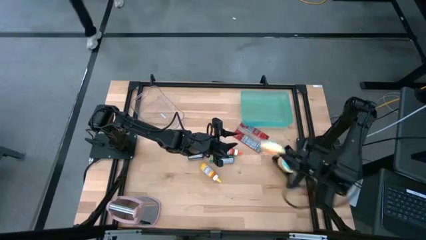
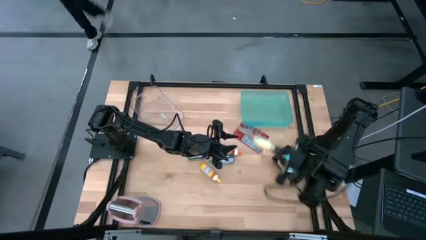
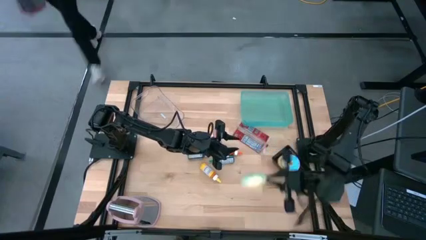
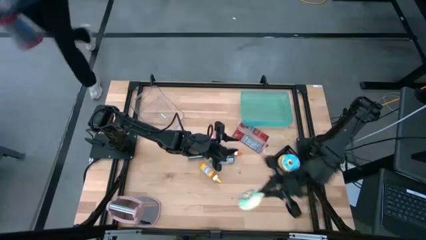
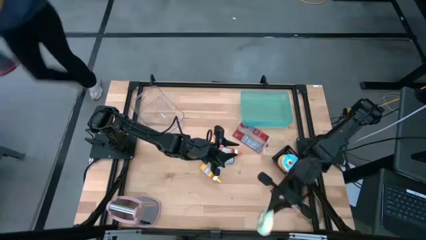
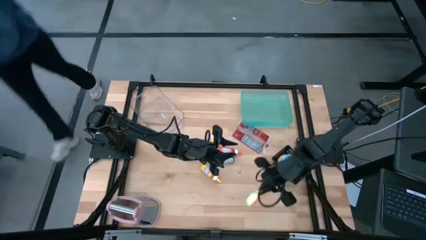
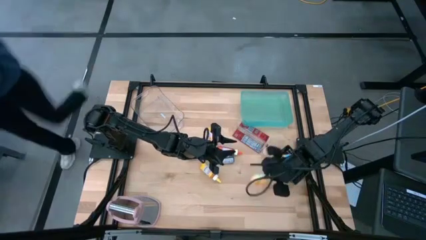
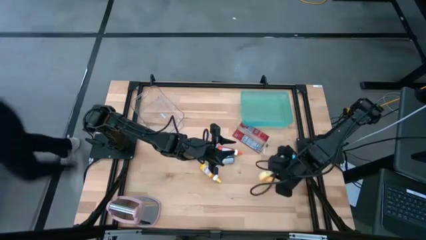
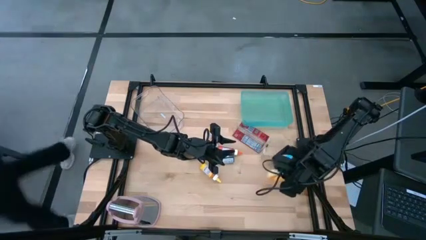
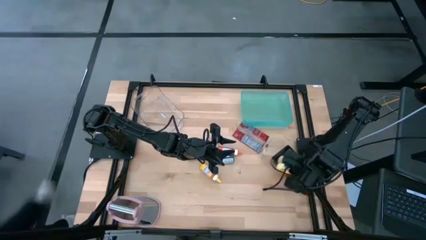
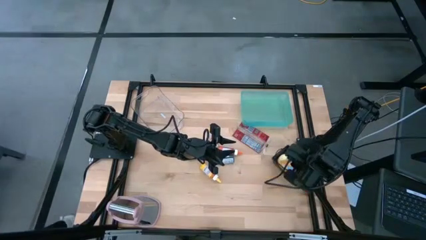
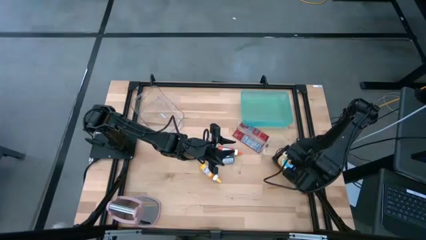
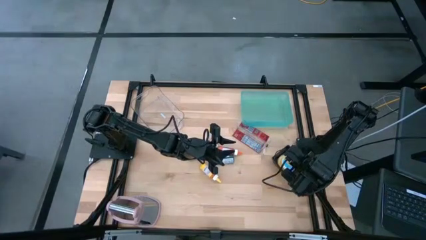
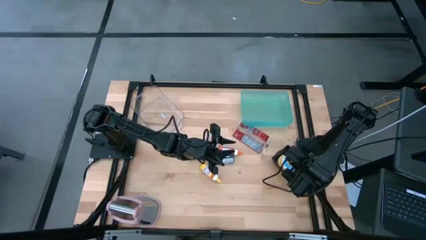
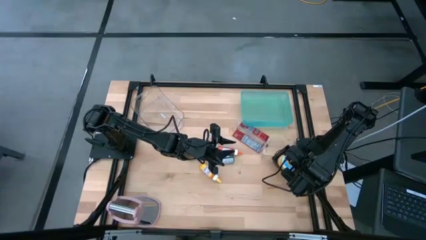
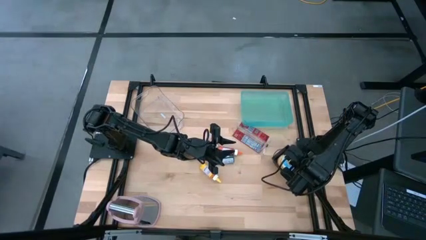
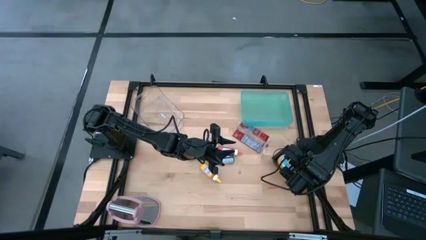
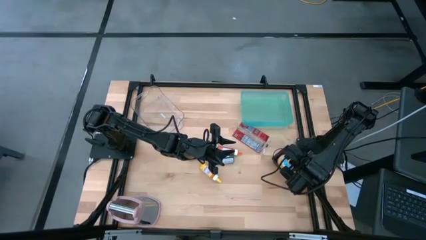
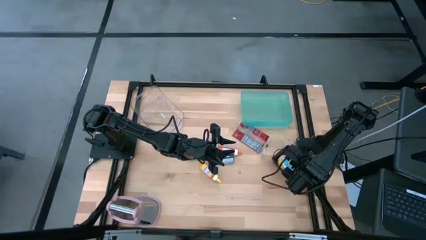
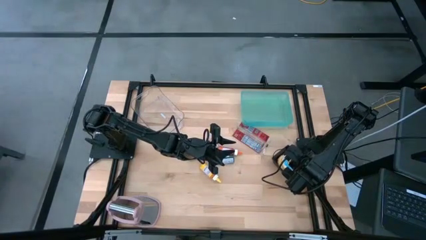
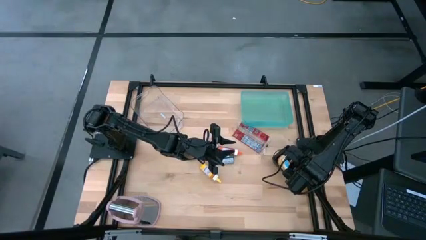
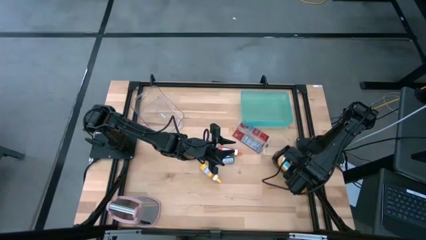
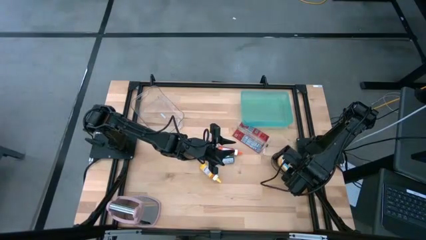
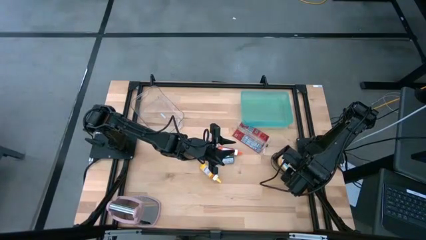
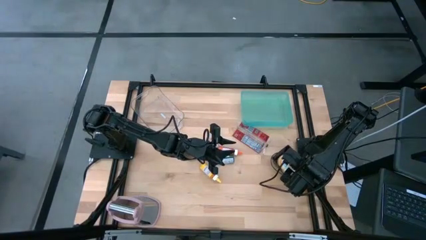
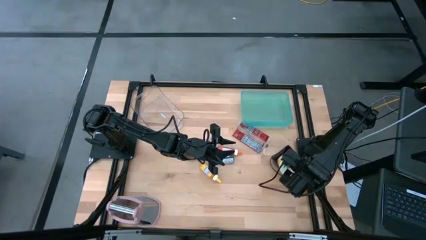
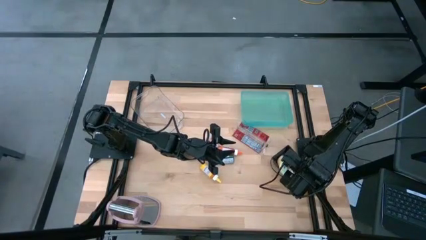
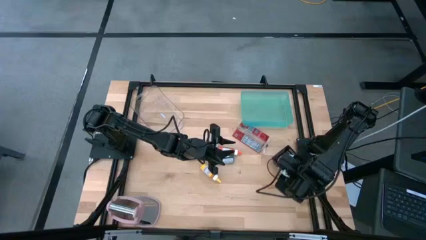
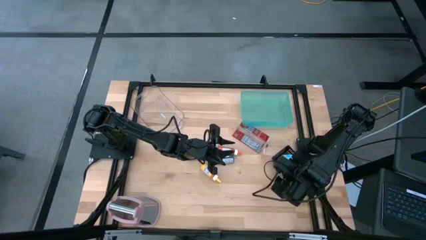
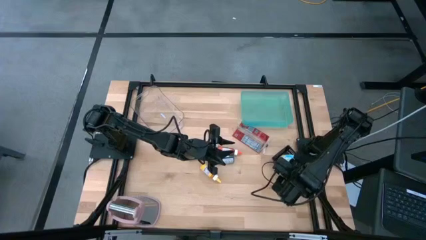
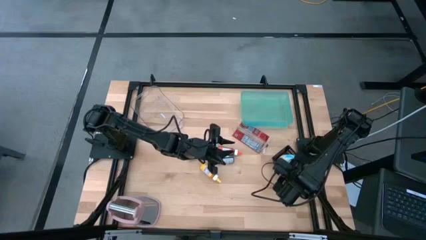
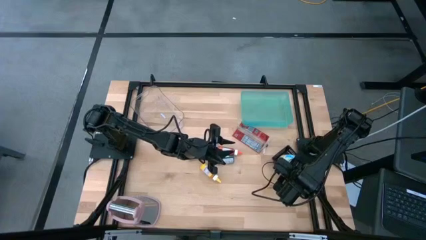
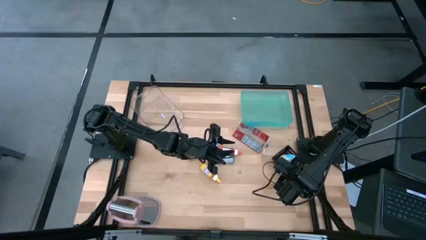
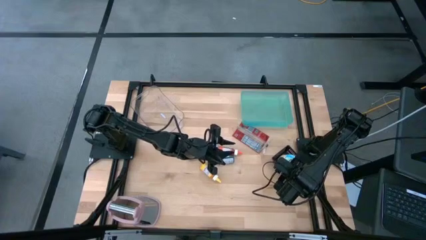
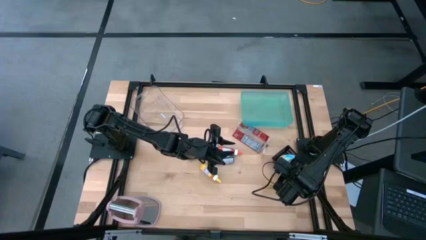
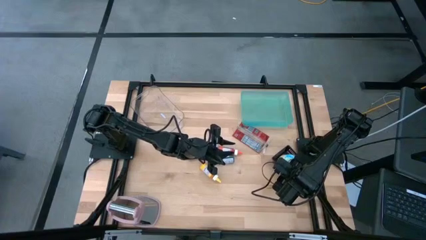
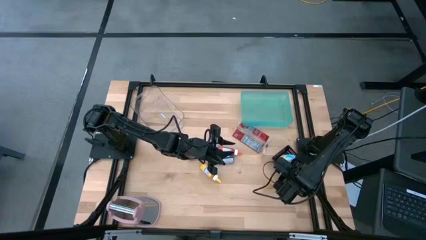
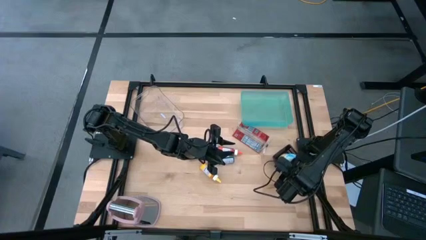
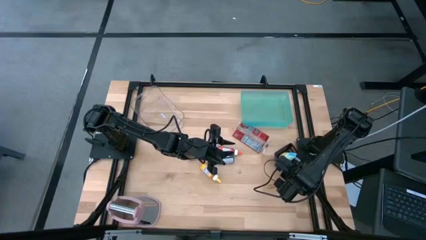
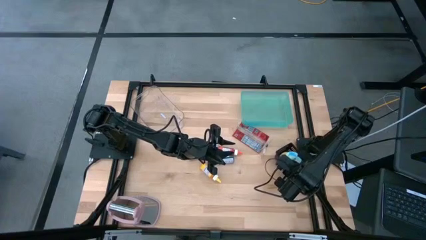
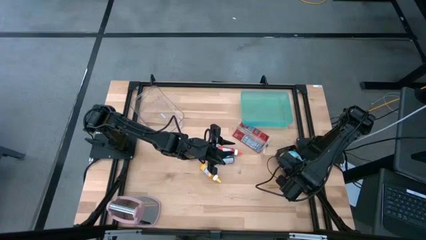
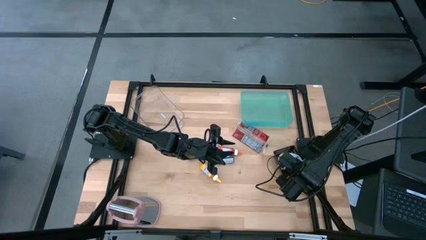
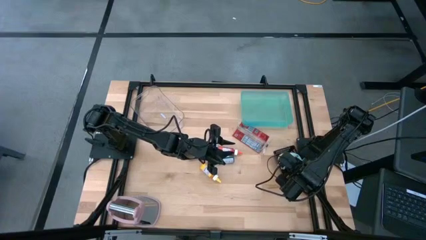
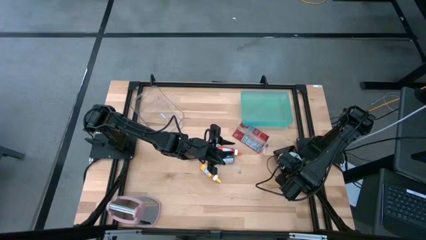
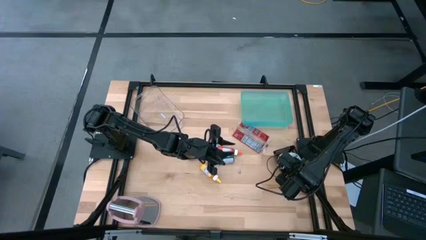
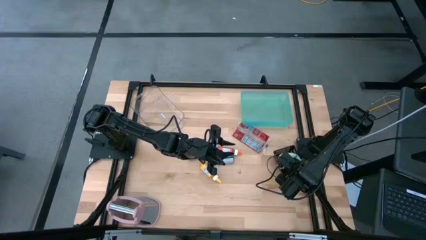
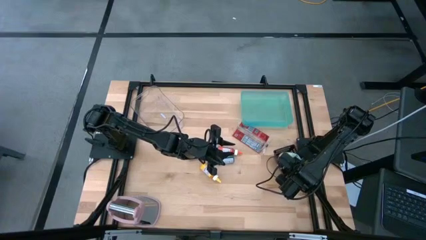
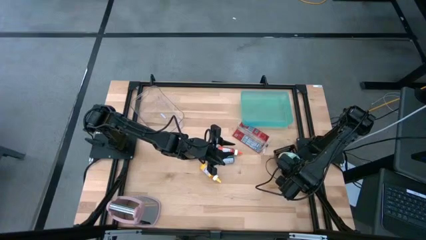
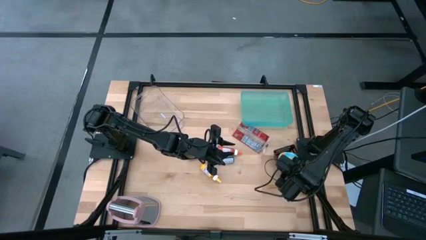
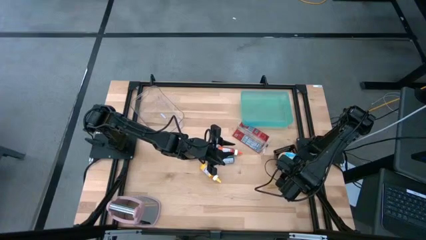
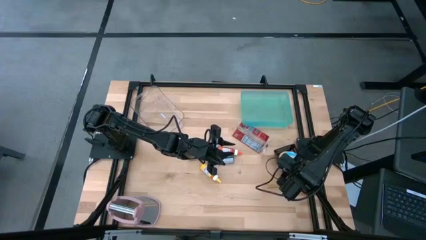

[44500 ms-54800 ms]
Put the light blue donut into the black bin

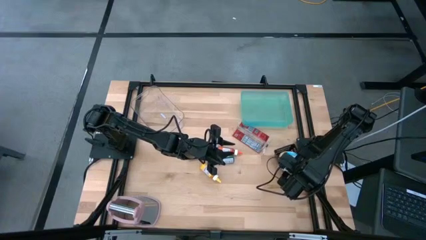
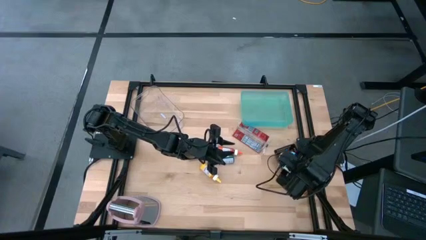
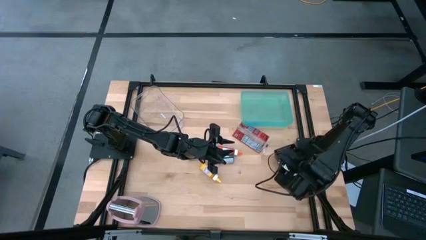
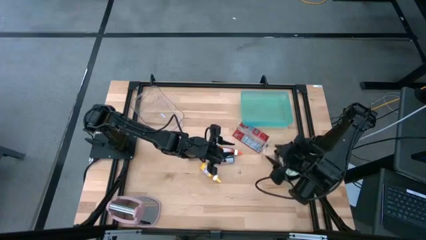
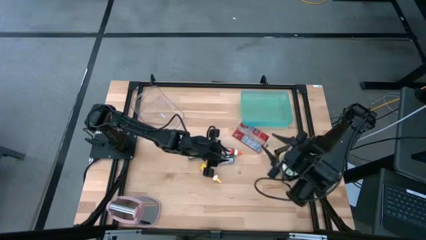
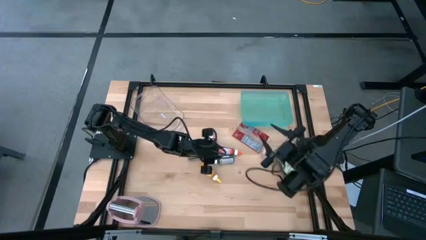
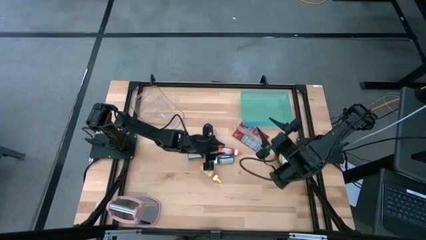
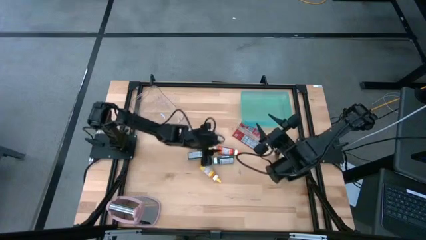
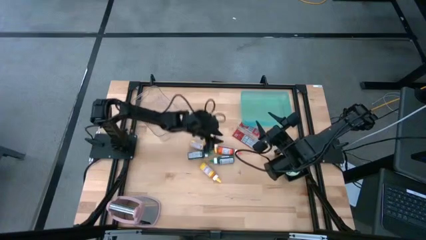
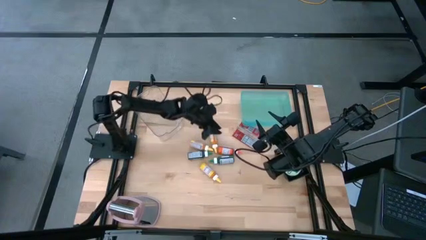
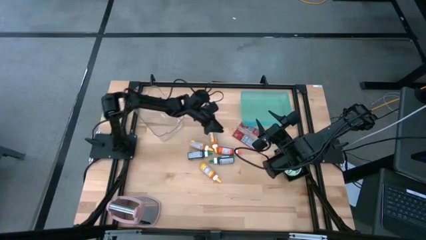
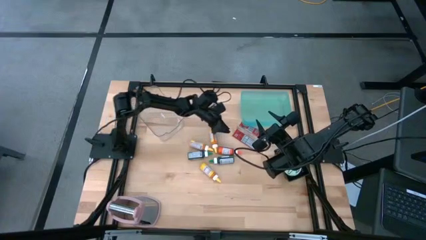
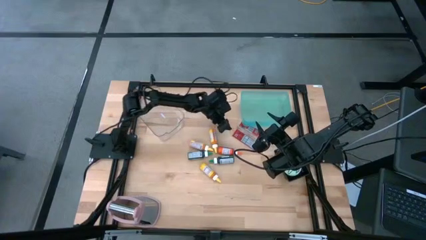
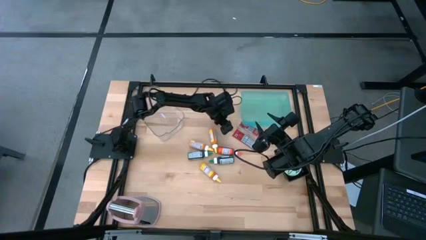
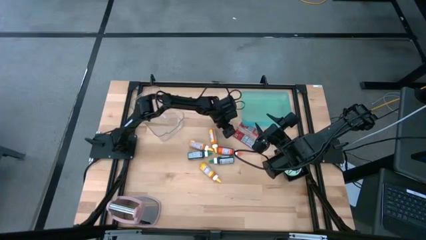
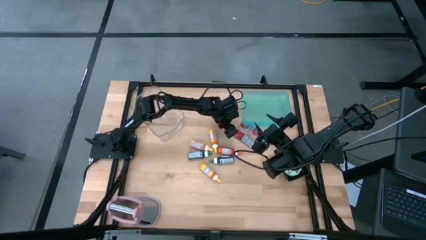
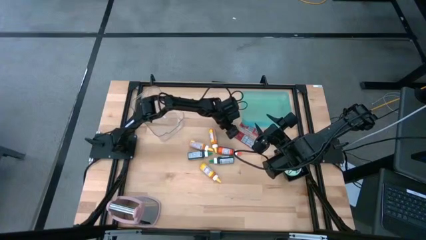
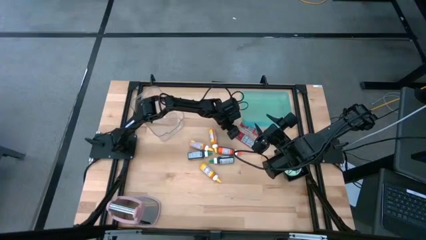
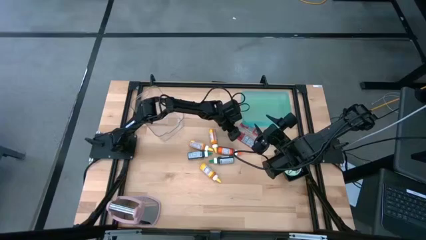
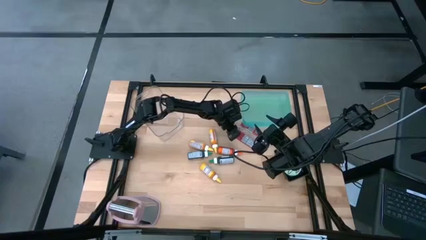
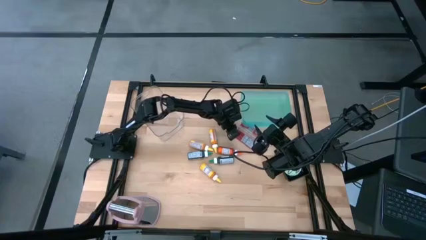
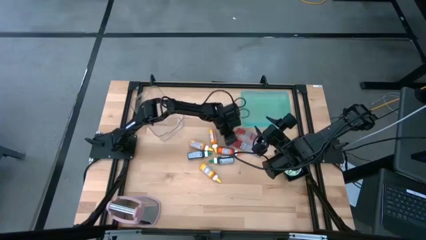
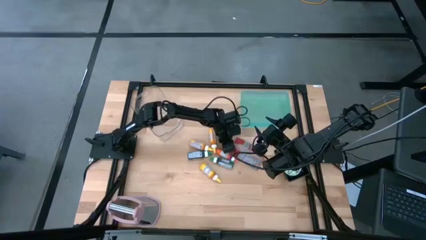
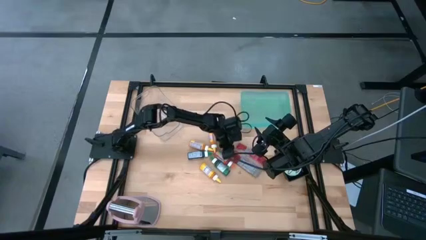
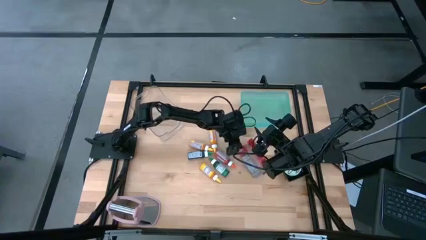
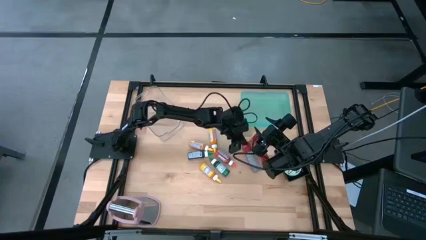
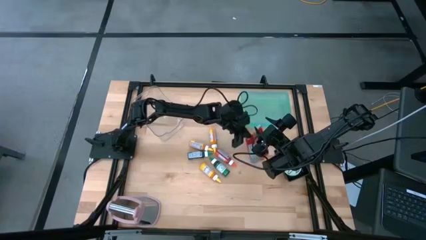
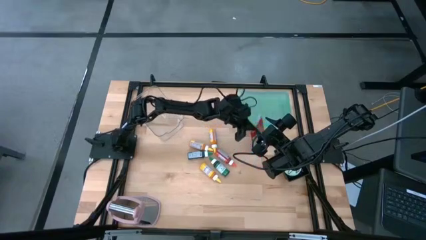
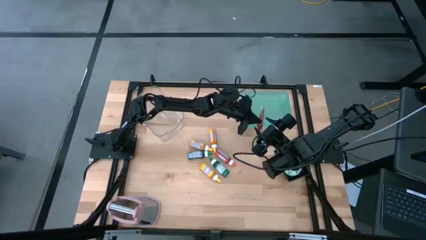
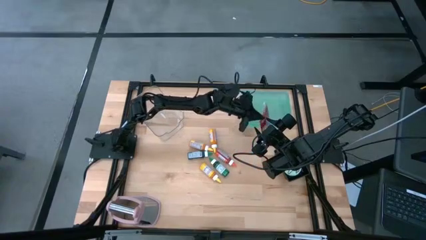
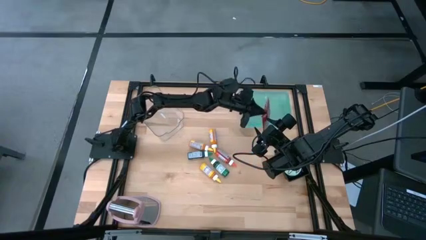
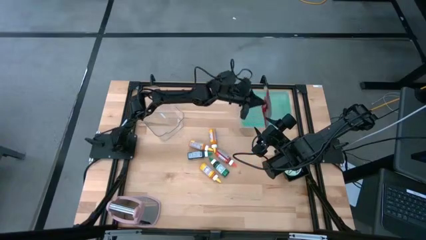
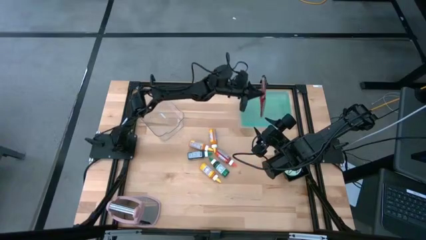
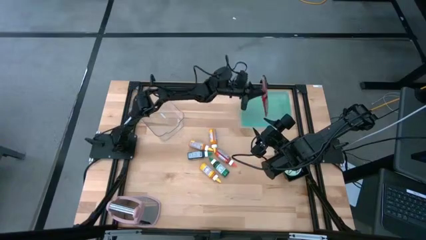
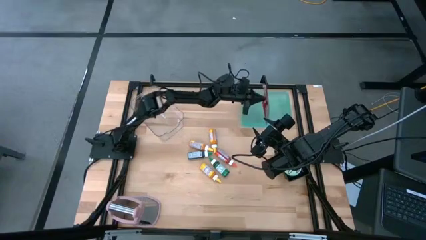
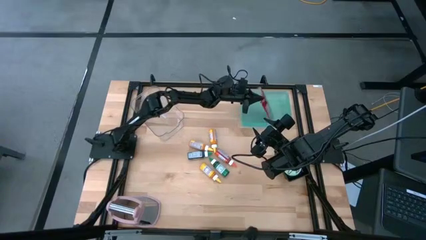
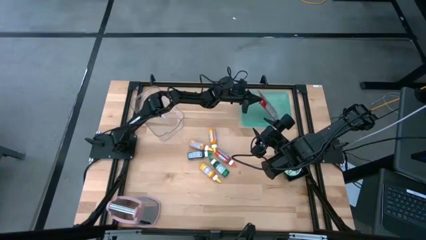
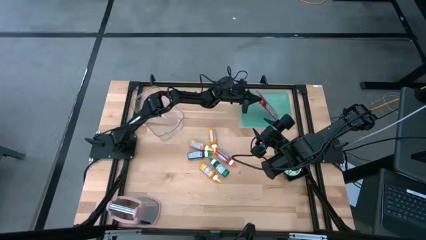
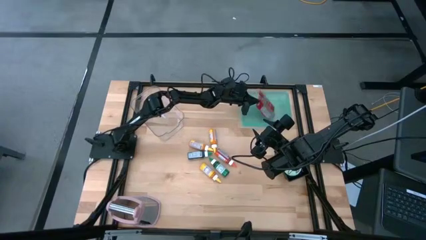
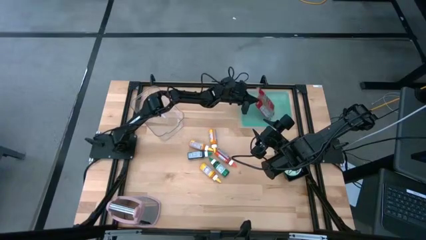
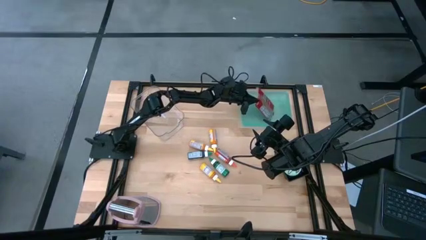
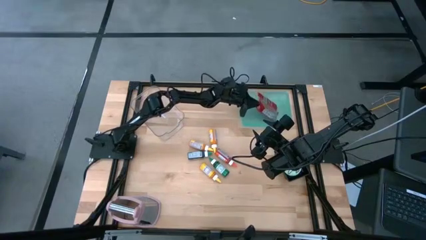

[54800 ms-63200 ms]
Put the red popcorn bag into the green bin
